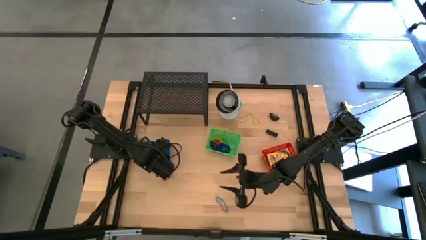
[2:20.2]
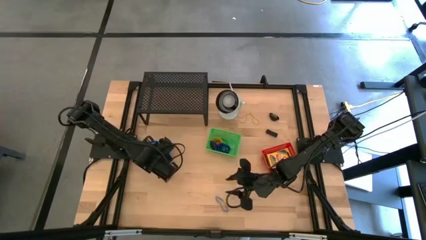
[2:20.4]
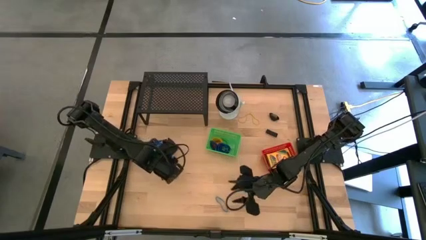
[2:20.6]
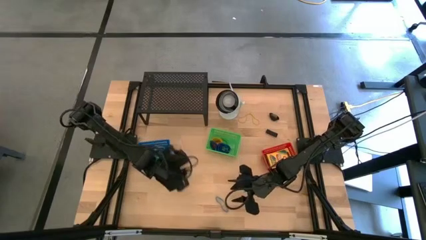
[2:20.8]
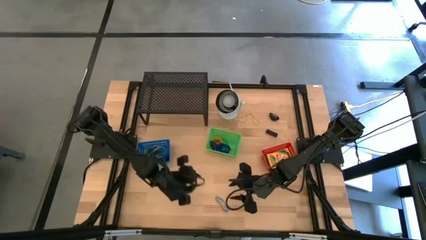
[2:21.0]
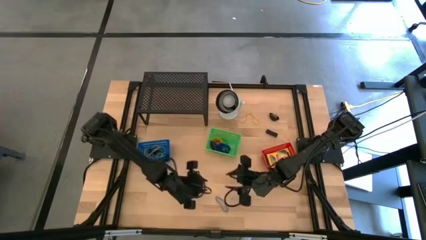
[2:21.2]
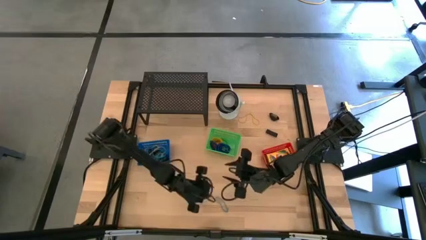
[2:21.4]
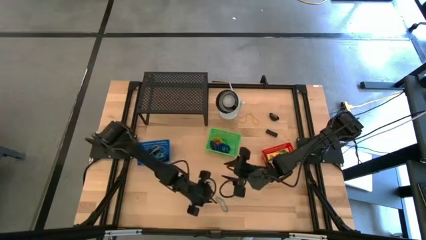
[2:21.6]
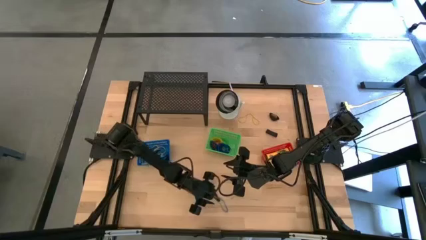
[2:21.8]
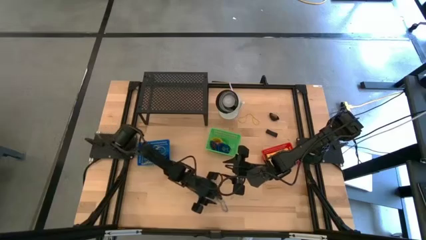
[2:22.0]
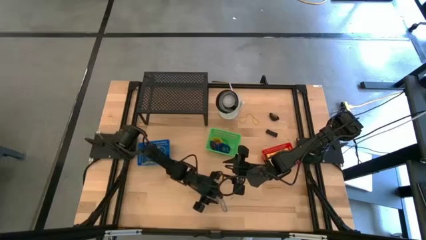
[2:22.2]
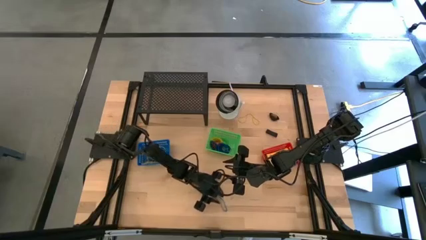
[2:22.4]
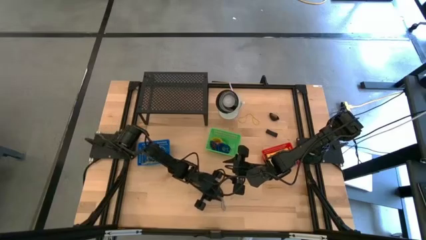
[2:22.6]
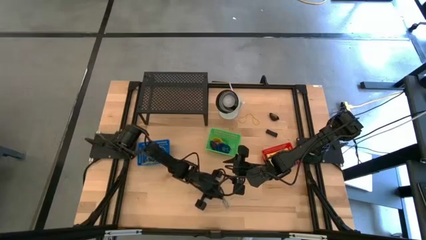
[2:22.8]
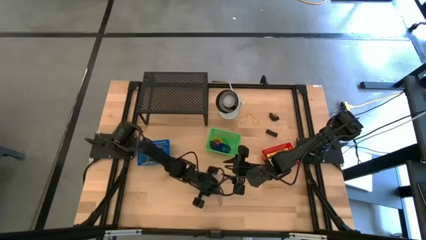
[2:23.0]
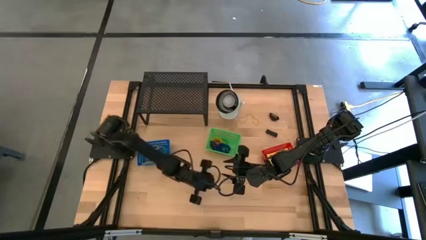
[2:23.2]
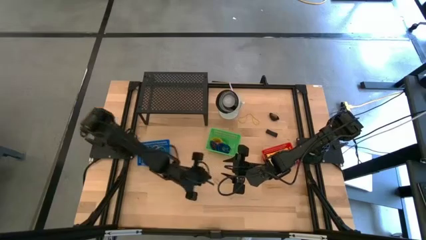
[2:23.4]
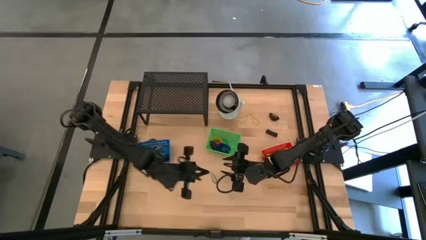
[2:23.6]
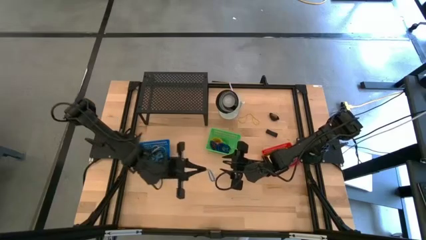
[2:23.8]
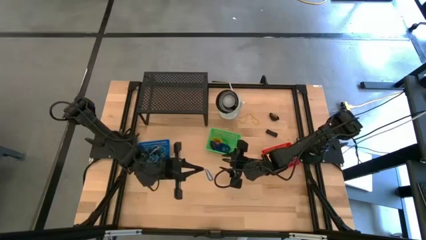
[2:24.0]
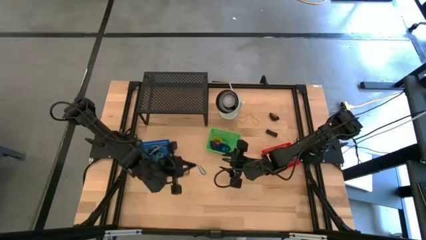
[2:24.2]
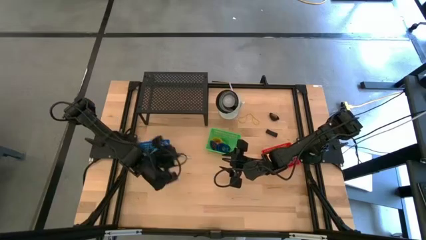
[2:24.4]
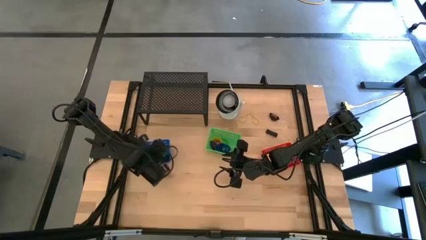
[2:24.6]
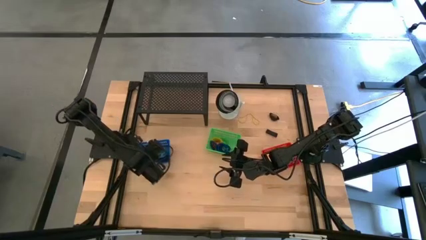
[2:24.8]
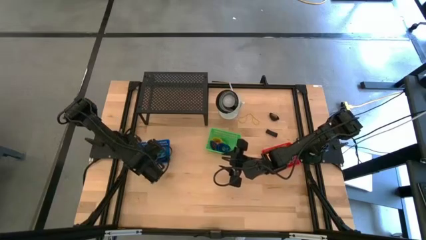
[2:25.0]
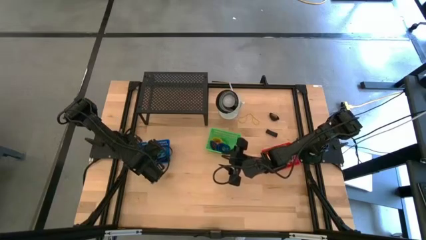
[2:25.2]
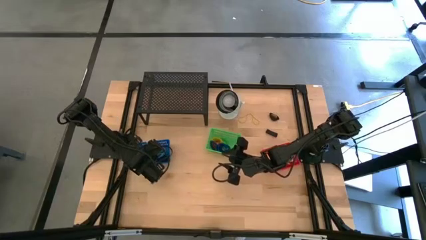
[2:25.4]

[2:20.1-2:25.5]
Task: Pick & Place Office Desk Supplies
Put the blue rubber band into the blue bin

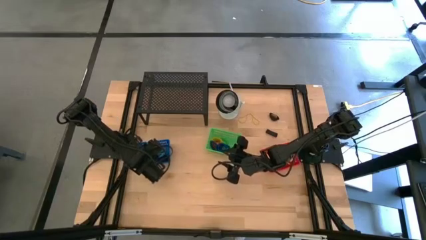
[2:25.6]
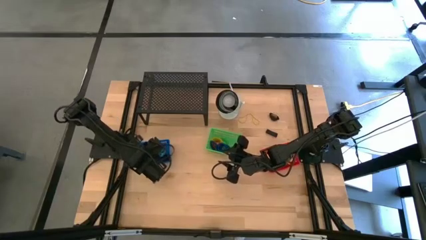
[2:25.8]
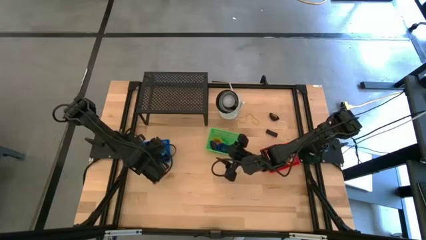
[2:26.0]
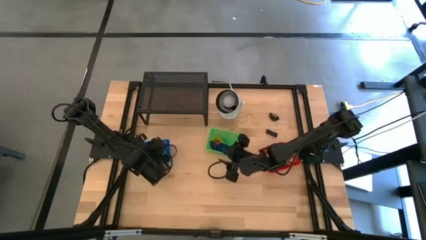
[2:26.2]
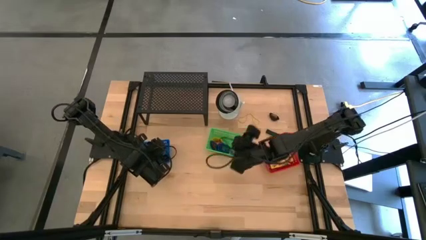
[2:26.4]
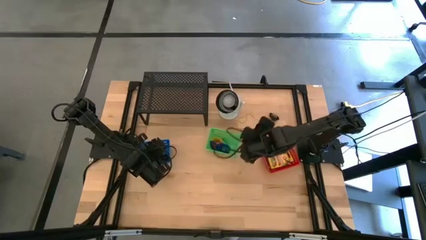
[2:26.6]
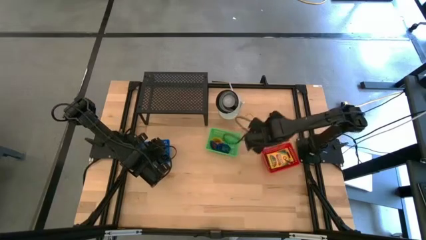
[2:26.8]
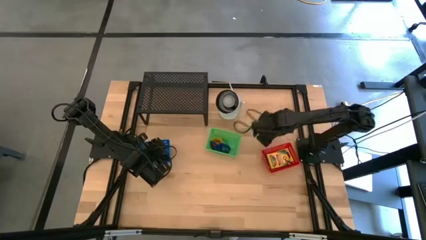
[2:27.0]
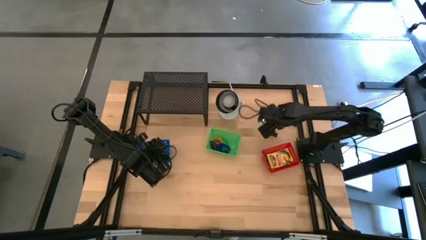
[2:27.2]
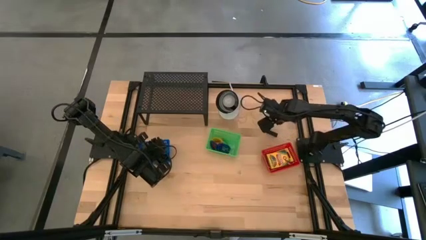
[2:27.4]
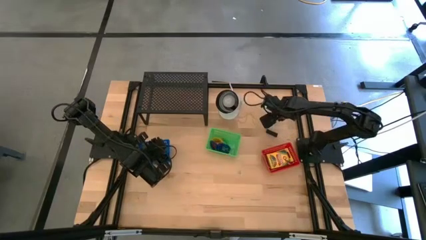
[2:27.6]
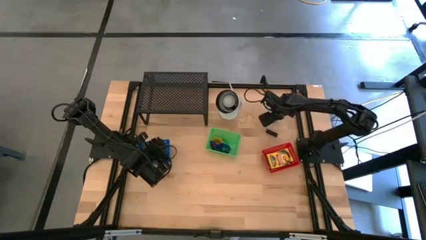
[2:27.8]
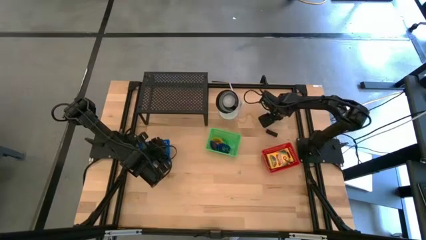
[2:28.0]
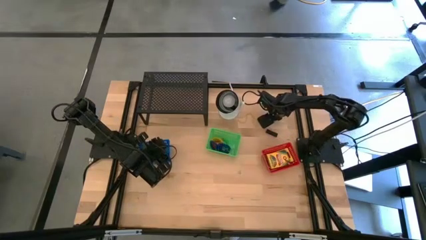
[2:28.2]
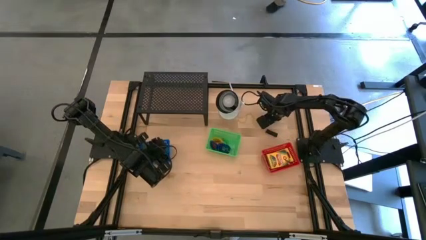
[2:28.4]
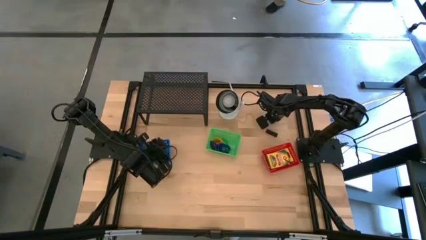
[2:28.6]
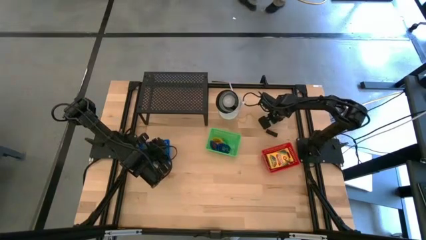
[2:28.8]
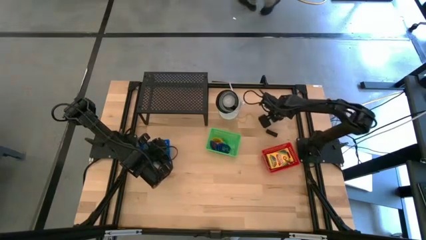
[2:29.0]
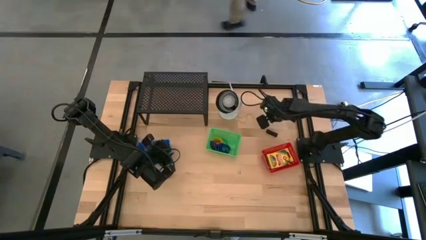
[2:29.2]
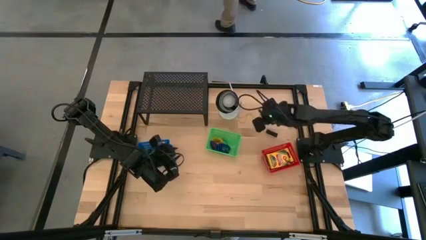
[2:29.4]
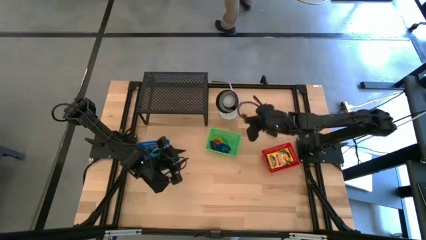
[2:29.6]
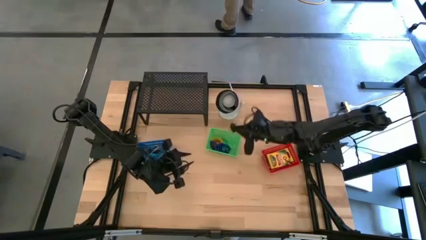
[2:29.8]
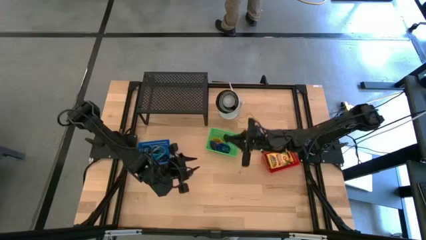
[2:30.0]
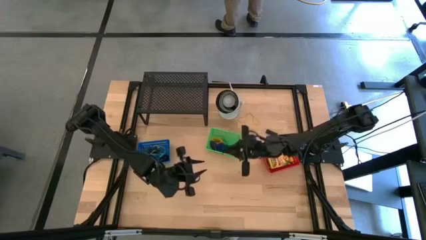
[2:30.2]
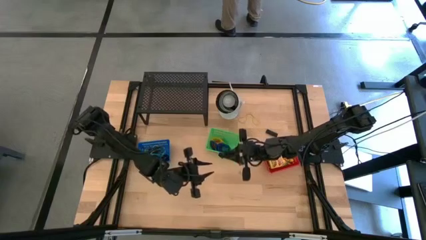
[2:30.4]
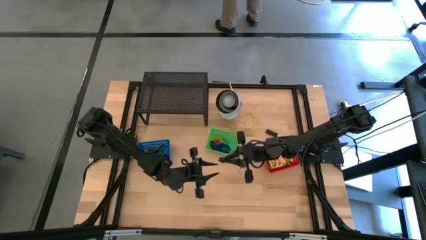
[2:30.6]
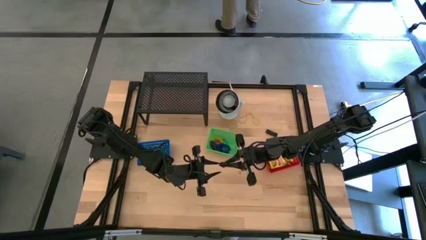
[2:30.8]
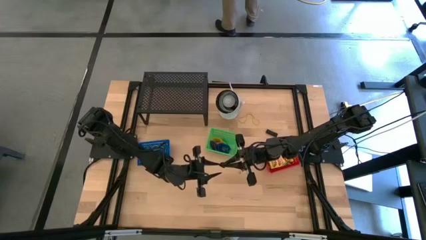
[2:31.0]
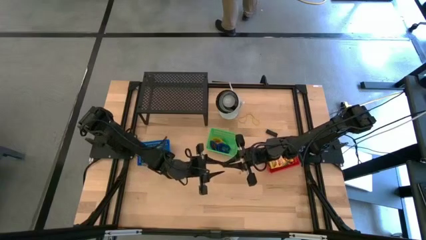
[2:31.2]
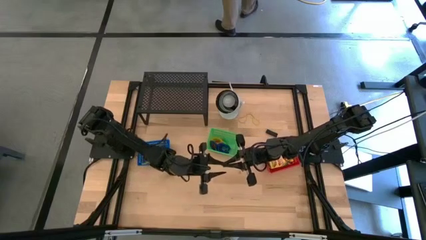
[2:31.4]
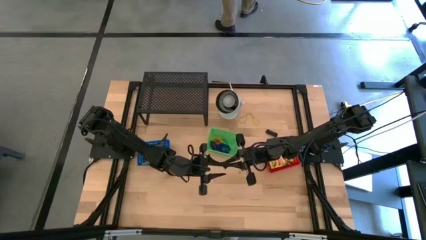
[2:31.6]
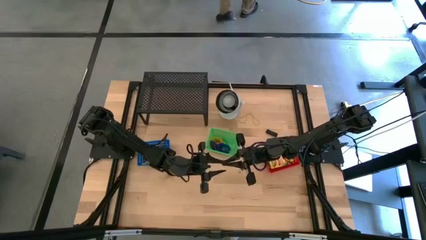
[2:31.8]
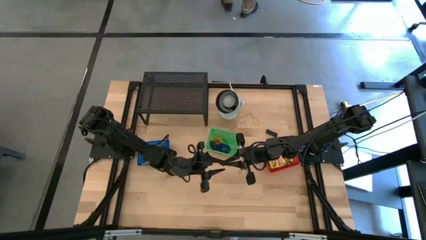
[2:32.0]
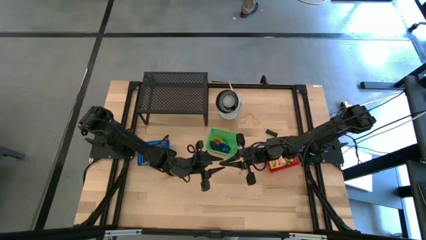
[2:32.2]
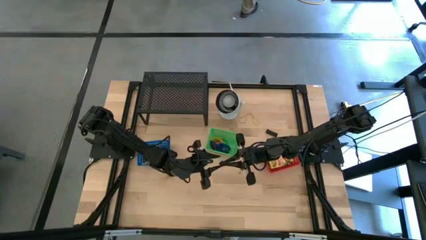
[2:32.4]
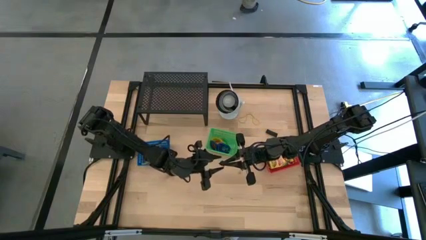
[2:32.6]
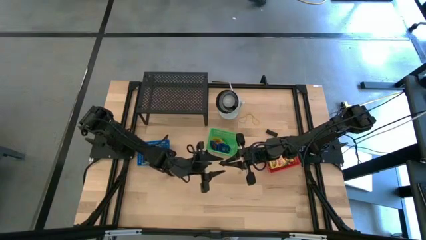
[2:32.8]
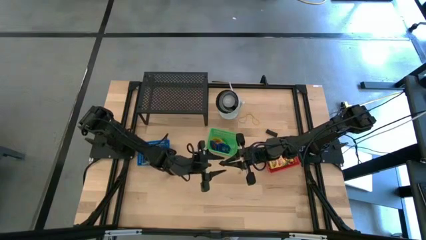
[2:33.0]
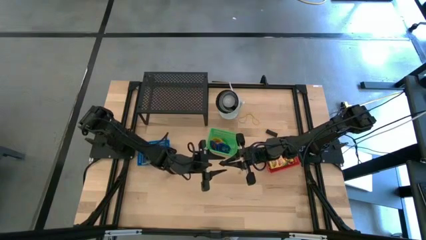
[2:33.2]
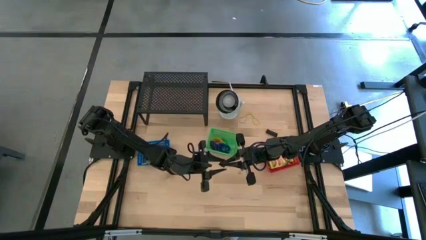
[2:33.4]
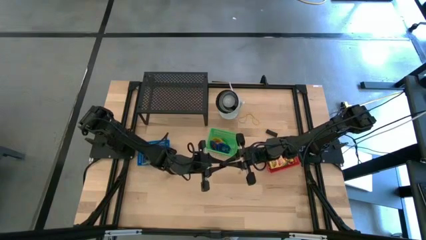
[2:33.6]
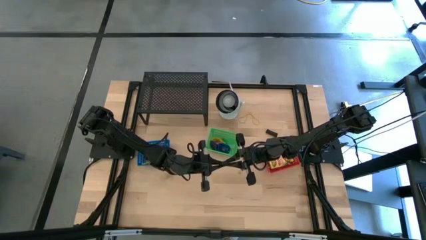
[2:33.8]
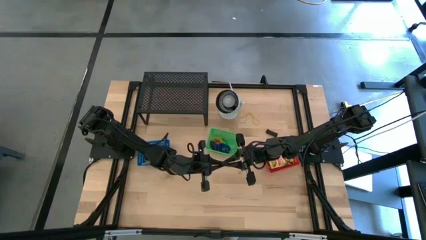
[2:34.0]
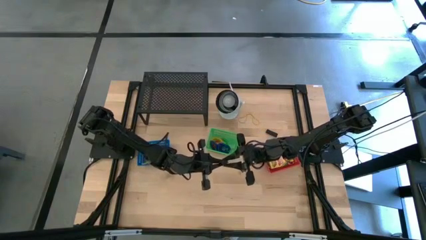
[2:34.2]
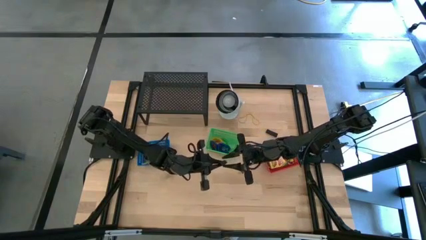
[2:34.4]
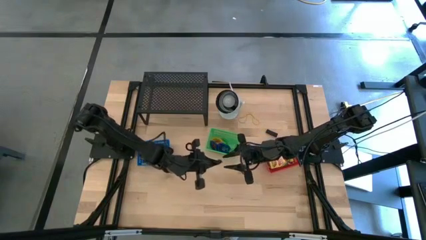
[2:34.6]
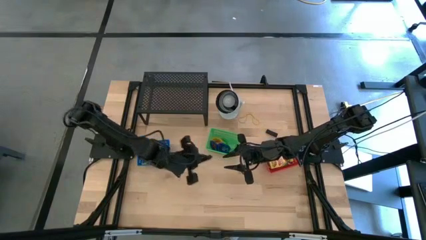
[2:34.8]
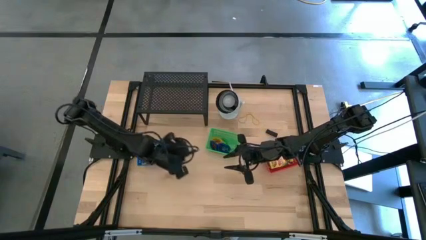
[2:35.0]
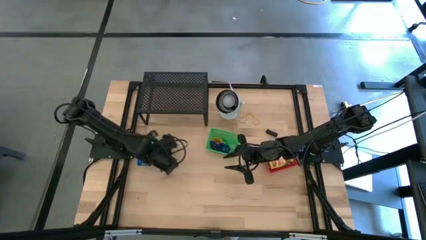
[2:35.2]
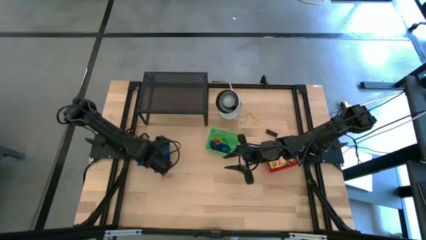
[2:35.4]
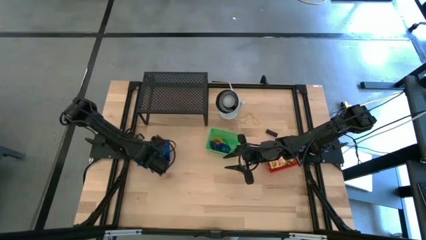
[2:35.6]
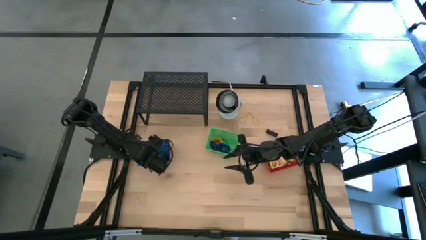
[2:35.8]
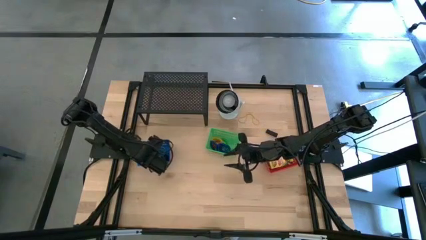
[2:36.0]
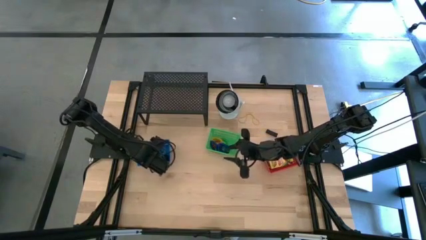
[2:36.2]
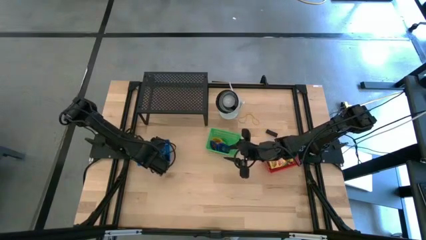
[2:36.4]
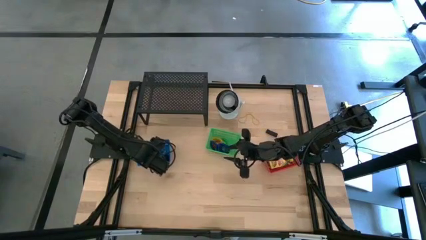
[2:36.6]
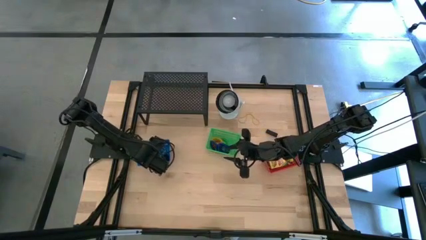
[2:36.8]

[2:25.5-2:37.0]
Put the black rubber band into the blue bin
